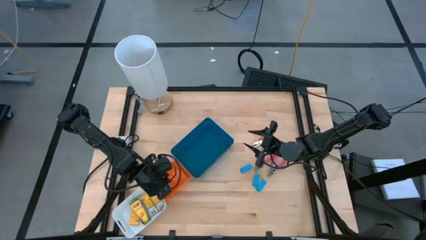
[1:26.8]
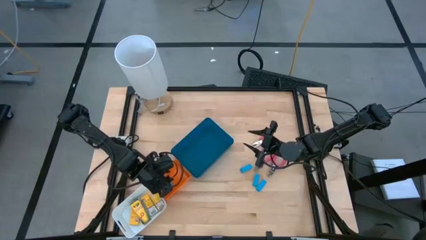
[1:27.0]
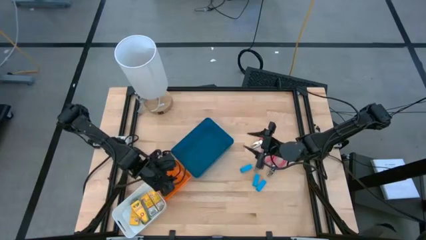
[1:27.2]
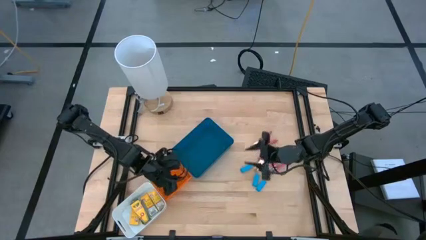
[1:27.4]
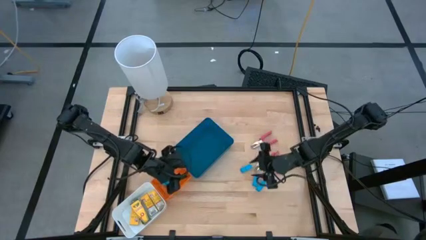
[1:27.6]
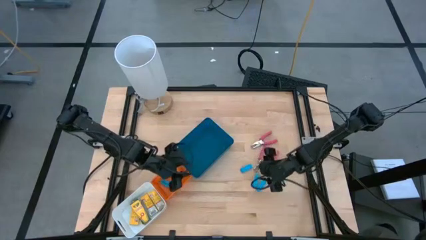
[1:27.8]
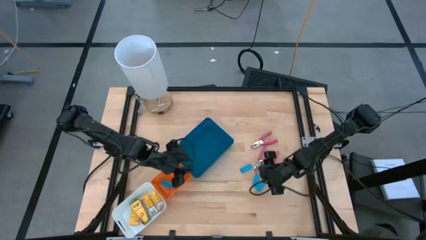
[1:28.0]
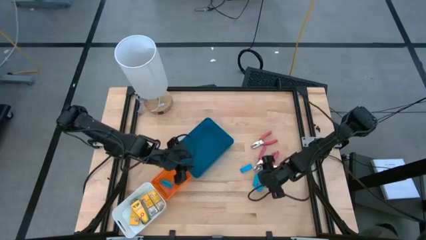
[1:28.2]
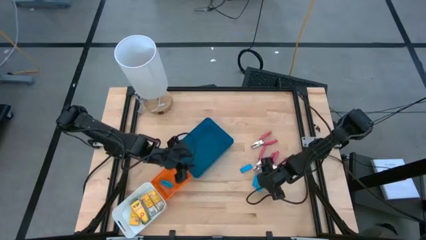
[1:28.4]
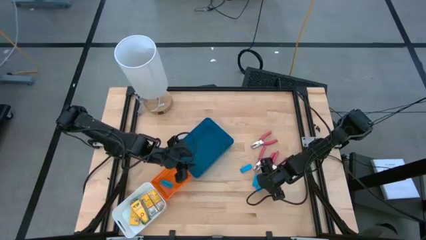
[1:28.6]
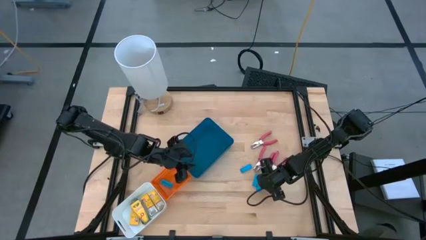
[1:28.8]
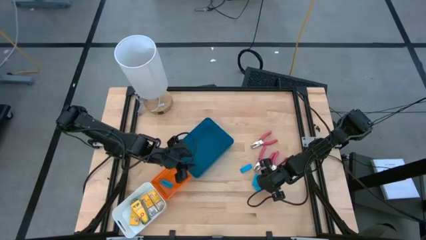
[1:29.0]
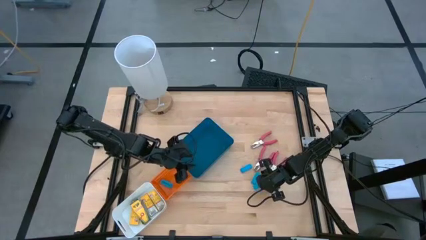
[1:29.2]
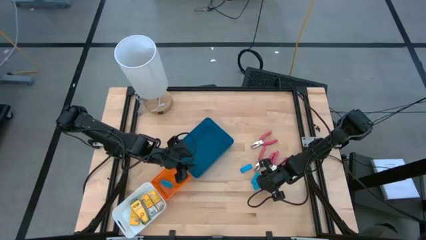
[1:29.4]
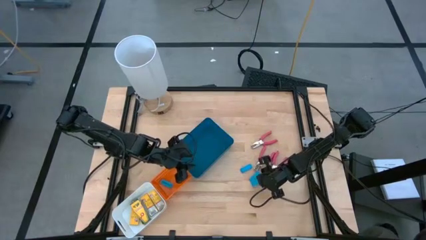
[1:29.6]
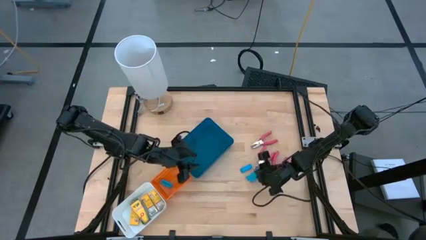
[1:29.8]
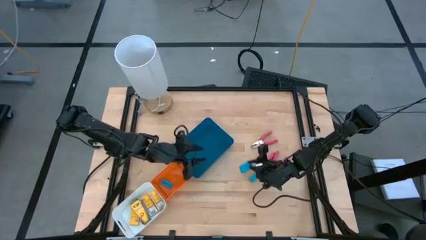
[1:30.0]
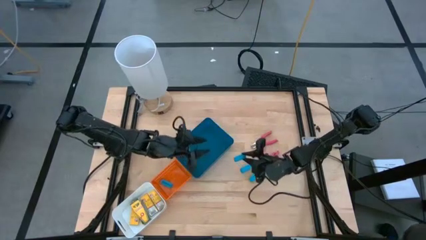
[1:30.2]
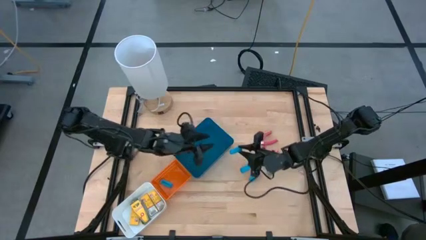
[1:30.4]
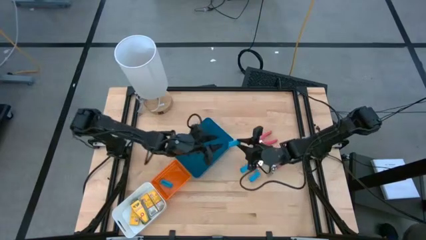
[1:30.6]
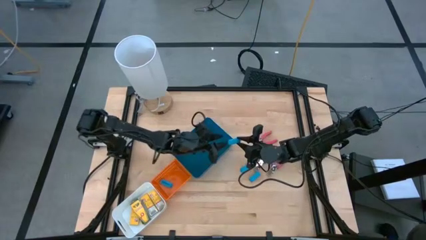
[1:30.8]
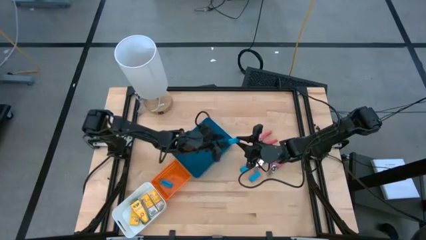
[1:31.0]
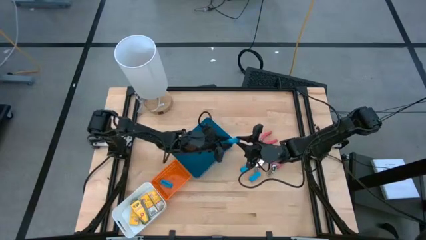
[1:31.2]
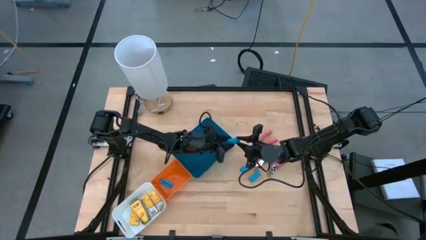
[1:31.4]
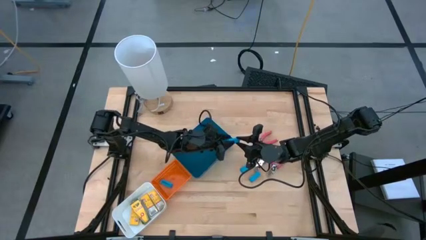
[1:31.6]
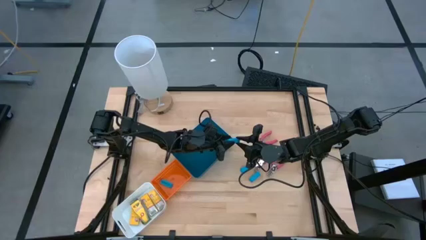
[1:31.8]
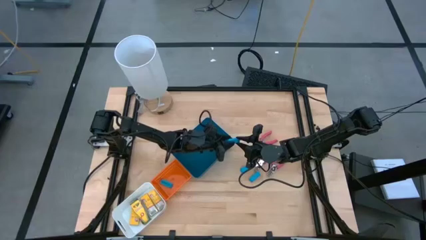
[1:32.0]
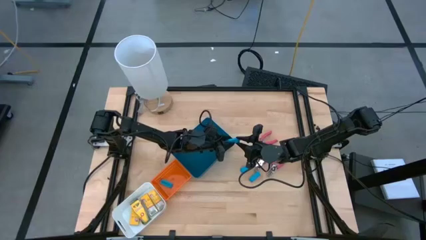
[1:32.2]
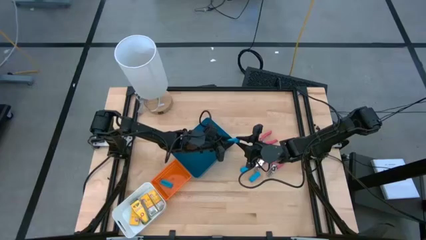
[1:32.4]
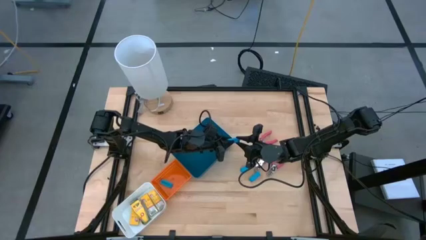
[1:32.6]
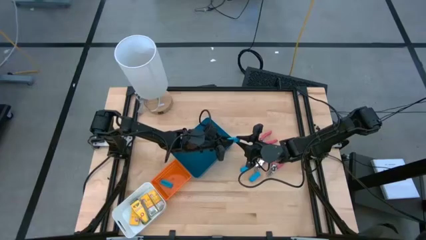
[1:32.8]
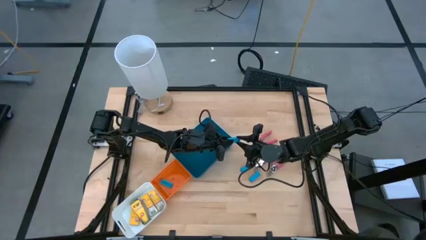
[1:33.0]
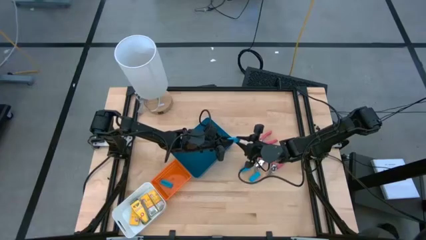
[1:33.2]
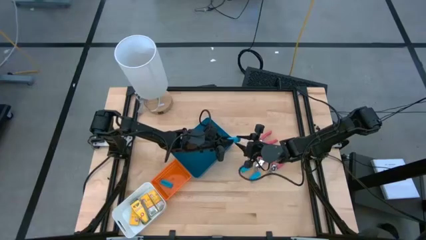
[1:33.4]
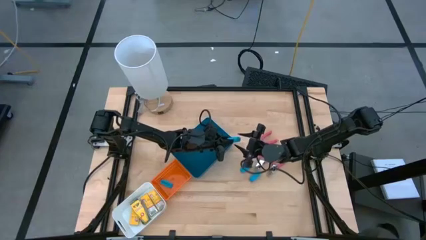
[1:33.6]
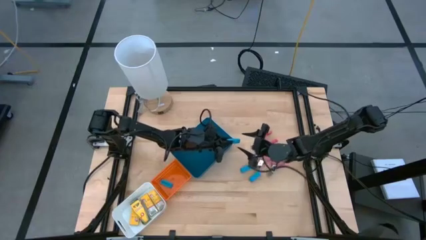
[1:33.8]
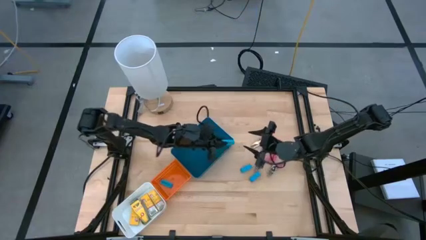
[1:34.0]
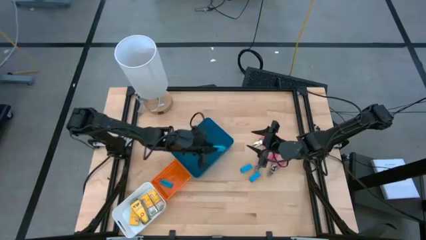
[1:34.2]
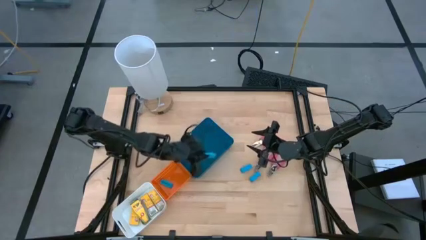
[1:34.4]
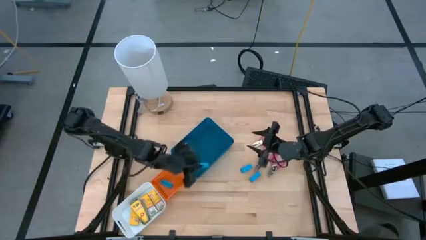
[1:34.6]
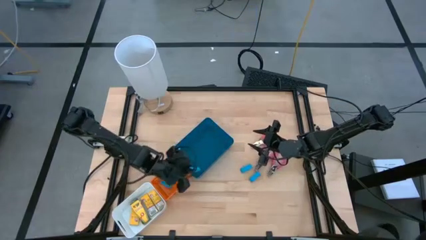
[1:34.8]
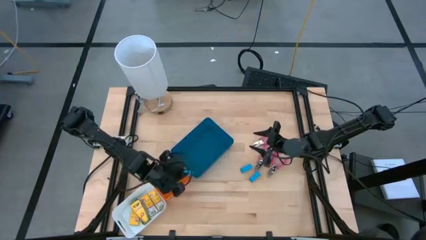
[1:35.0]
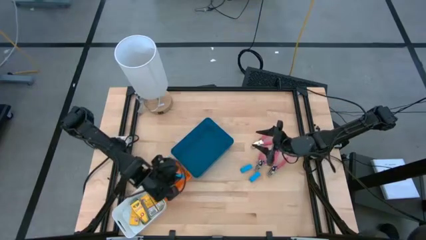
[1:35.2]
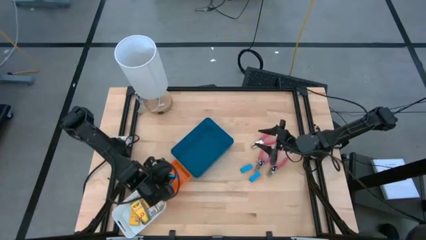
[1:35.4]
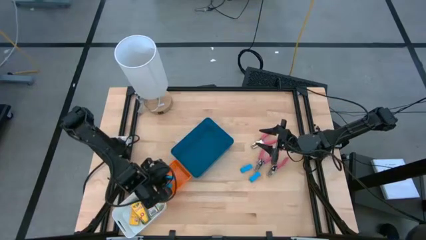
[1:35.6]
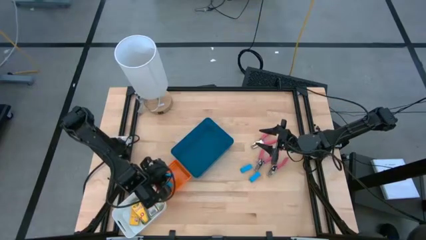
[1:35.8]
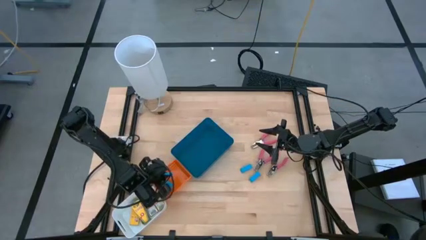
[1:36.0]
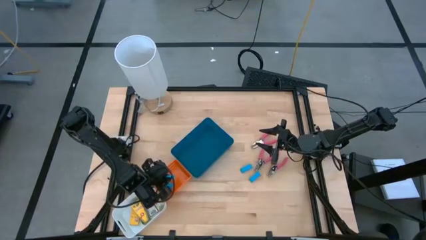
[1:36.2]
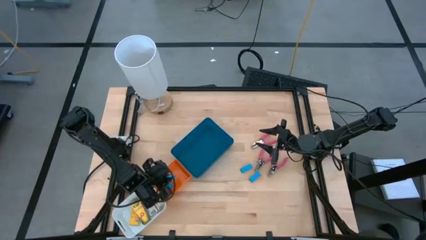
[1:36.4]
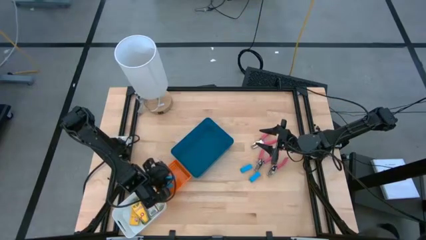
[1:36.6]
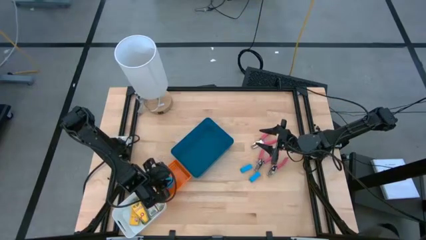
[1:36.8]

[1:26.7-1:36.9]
Task: Pick & Place School Supplies
Put the blue eraser into the orange bin

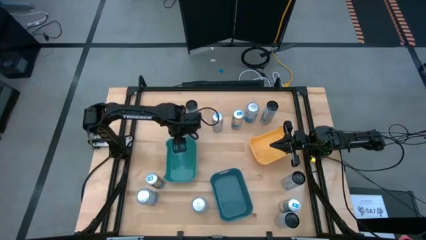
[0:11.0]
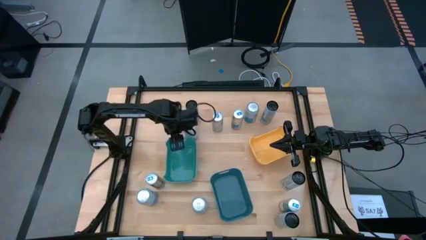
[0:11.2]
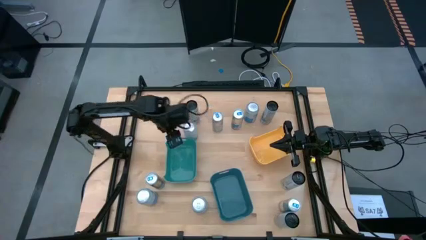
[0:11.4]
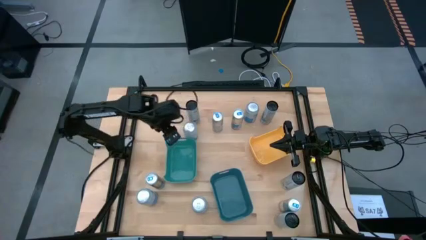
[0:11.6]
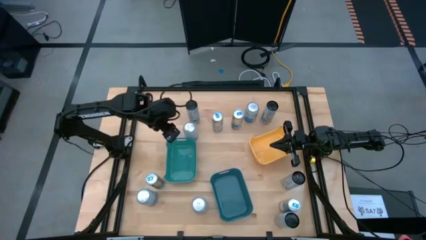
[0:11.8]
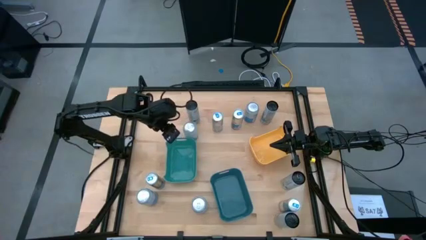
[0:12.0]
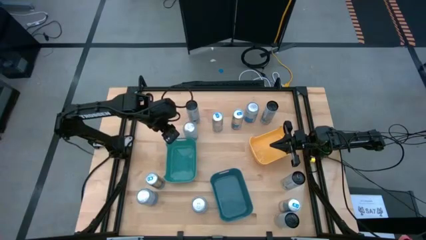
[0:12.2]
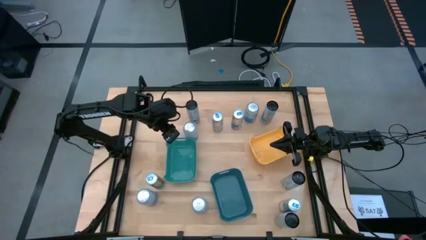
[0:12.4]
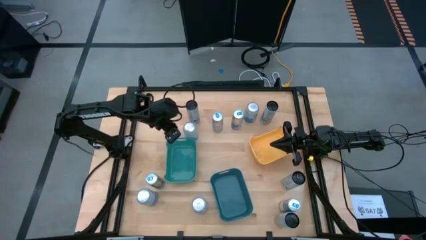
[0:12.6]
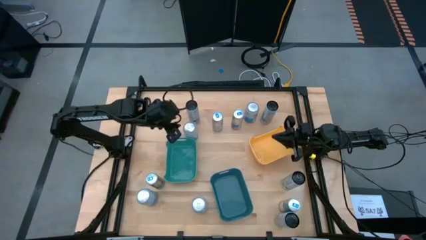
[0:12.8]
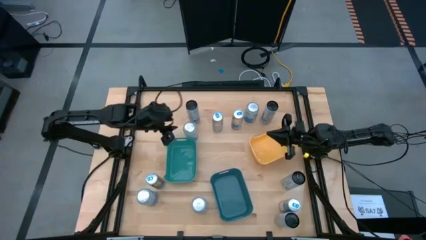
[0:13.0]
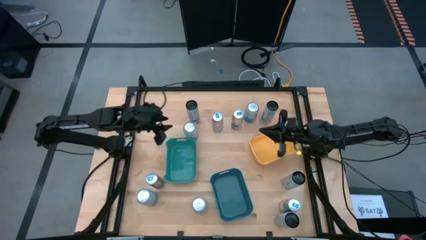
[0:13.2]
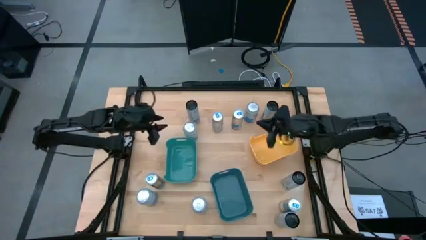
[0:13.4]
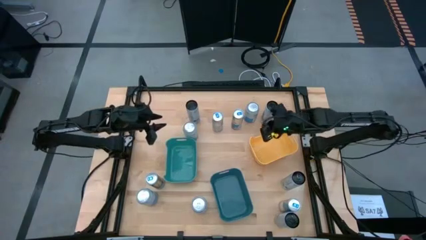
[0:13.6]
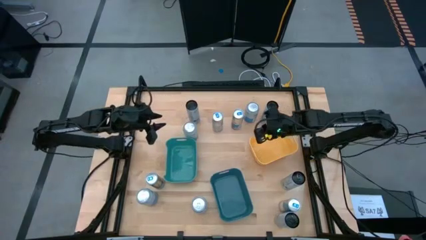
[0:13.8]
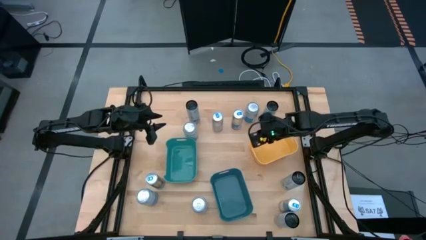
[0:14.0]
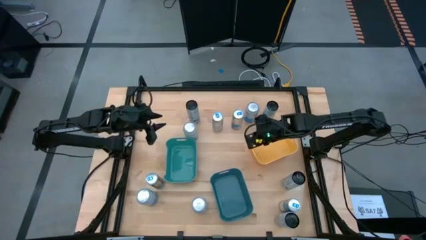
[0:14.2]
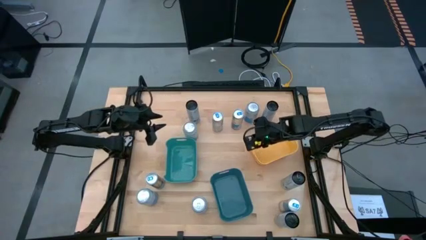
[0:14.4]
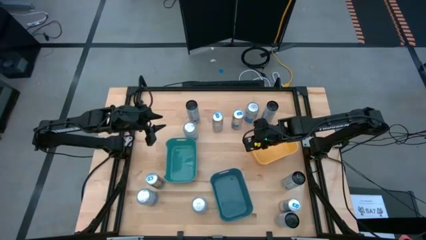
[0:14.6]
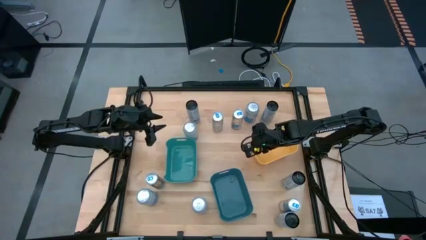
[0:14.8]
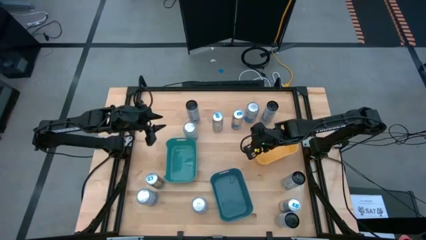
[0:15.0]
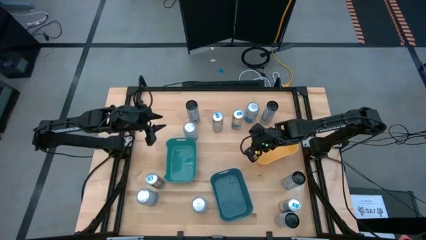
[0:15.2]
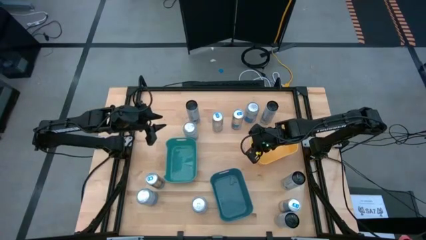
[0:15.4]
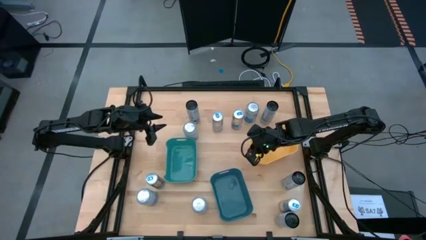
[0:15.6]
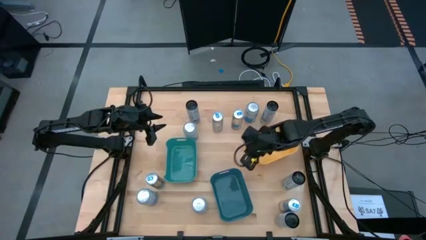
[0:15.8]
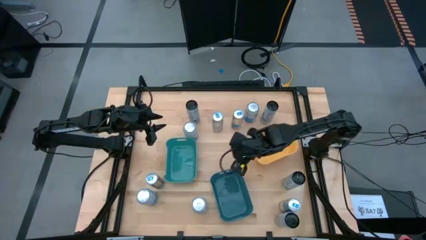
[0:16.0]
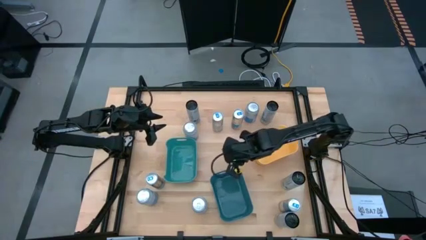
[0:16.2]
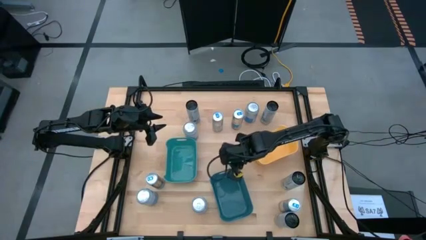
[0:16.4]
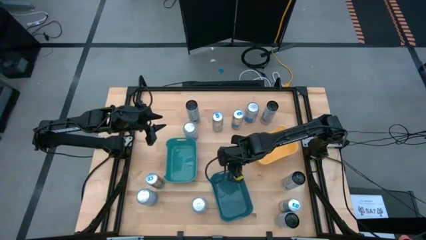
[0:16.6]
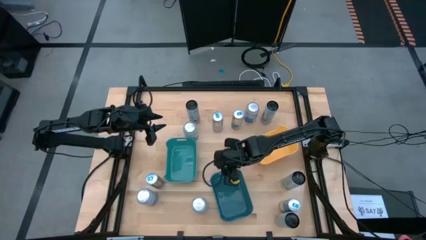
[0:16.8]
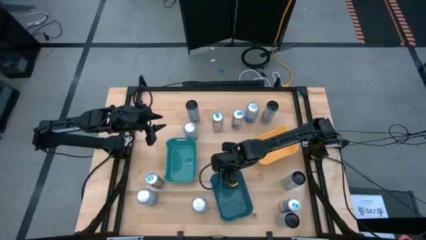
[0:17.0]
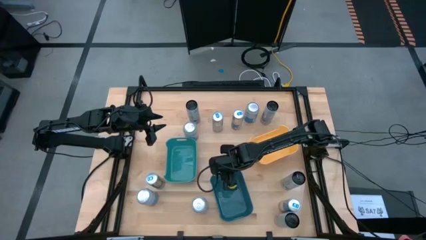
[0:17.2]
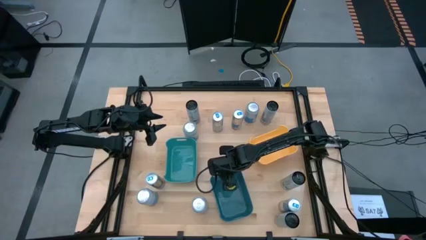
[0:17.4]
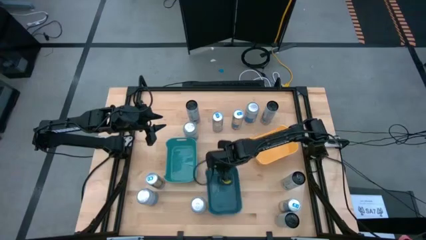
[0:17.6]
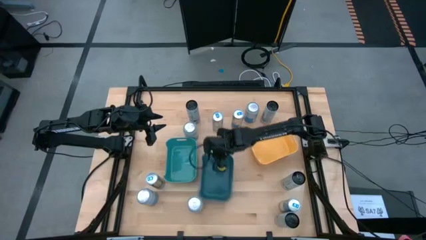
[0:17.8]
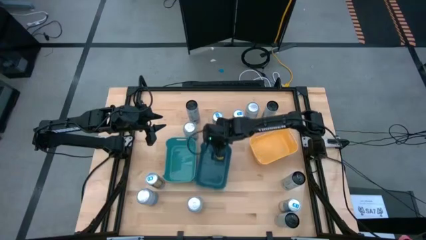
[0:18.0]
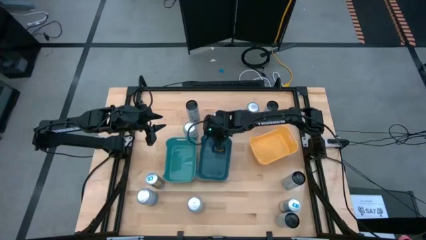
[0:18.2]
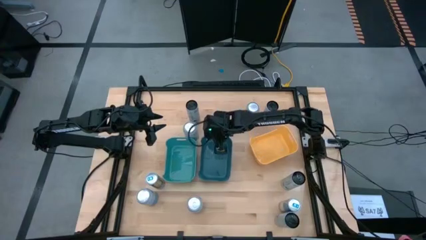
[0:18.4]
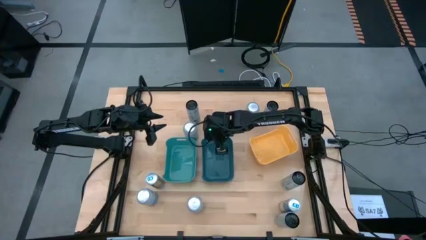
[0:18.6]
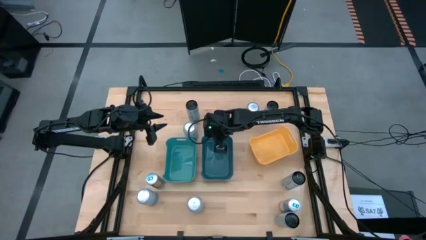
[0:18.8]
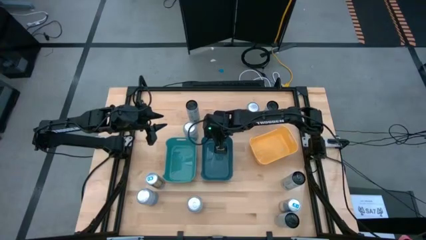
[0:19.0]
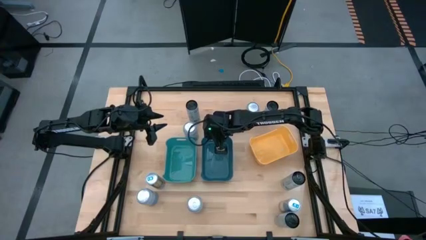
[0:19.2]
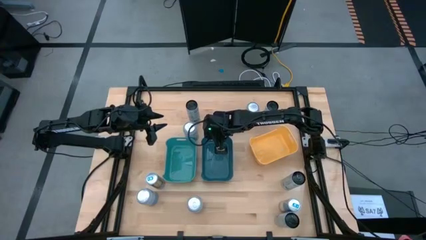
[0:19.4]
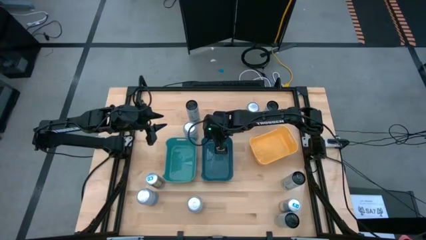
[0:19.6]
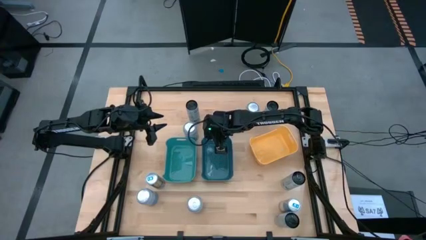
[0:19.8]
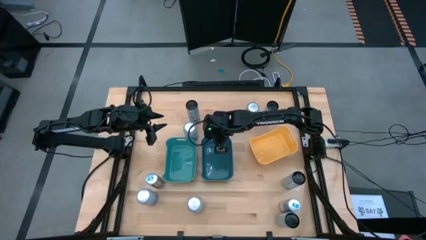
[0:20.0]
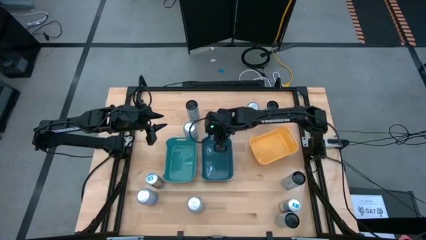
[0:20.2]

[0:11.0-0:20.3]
Task: Sort soda cans
Move the blue bin to the center of the table
